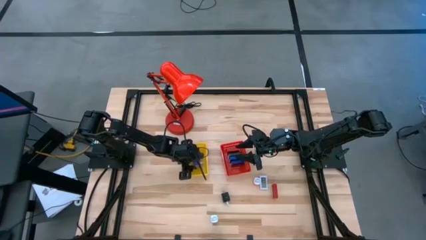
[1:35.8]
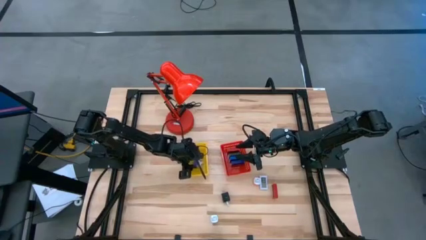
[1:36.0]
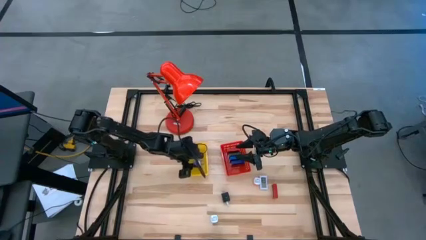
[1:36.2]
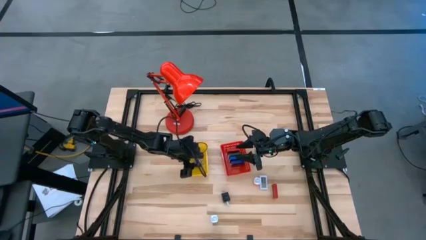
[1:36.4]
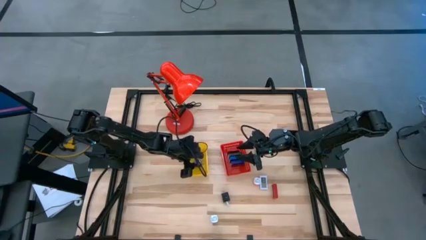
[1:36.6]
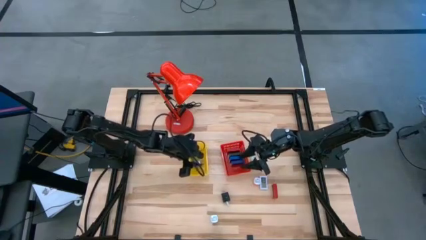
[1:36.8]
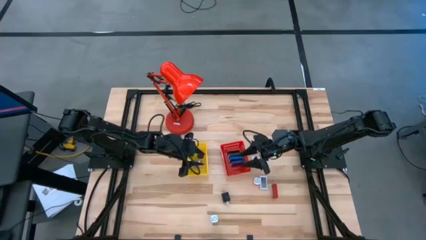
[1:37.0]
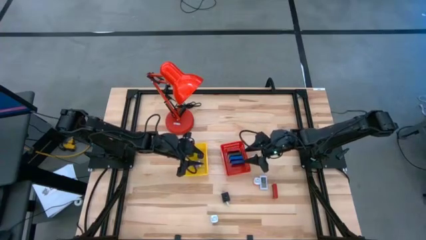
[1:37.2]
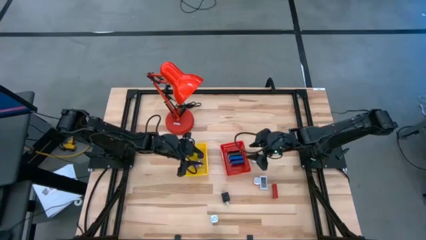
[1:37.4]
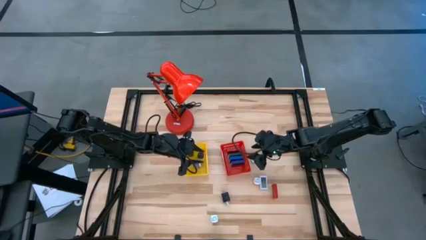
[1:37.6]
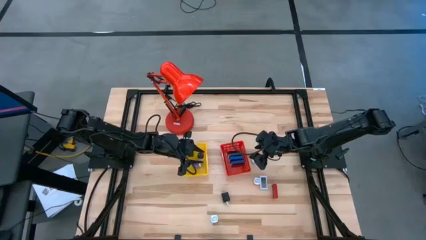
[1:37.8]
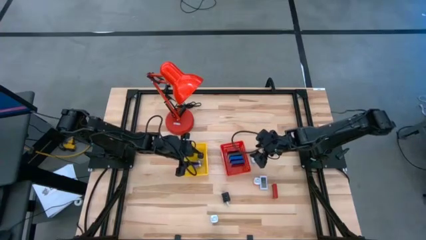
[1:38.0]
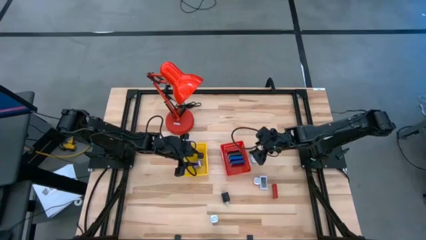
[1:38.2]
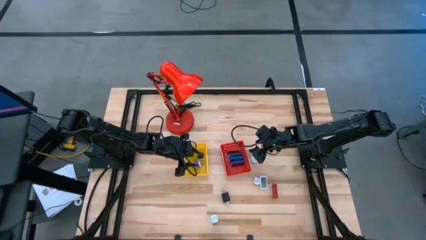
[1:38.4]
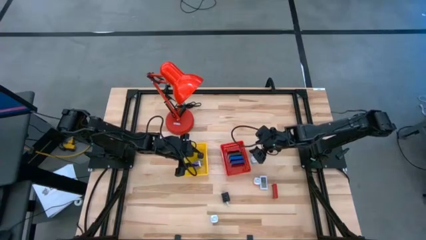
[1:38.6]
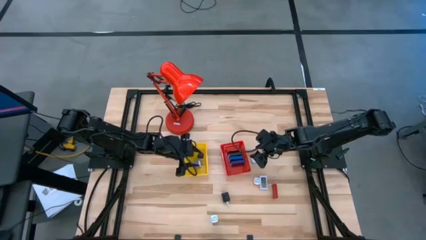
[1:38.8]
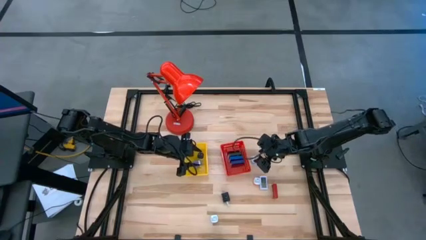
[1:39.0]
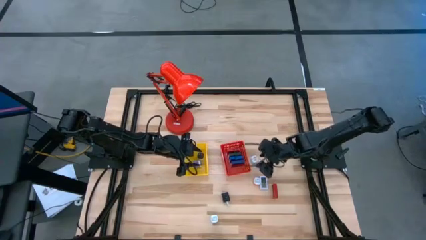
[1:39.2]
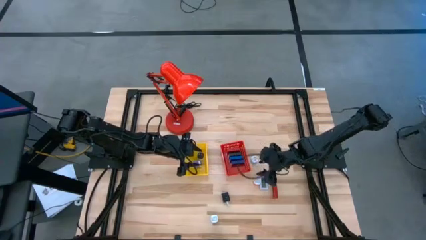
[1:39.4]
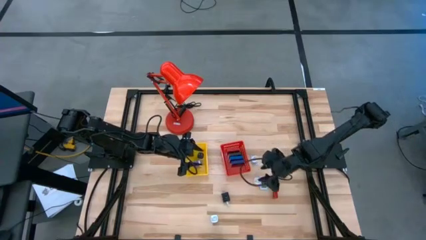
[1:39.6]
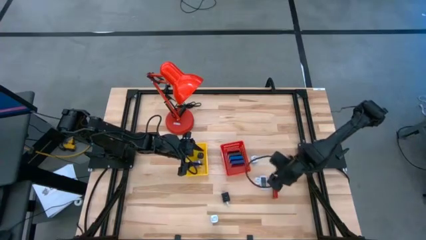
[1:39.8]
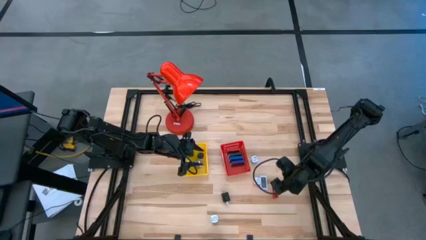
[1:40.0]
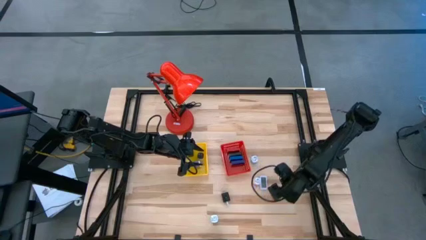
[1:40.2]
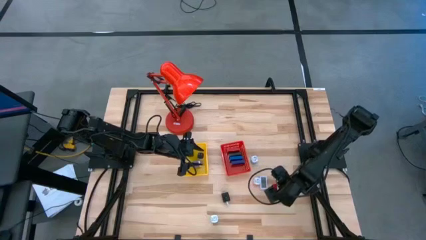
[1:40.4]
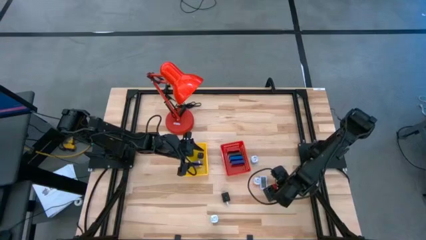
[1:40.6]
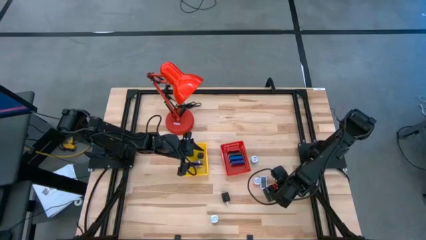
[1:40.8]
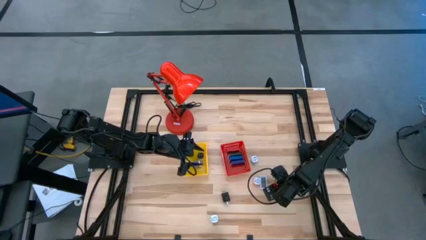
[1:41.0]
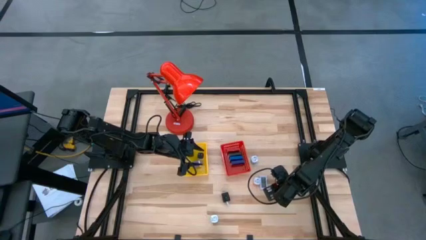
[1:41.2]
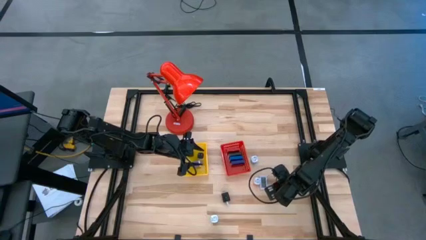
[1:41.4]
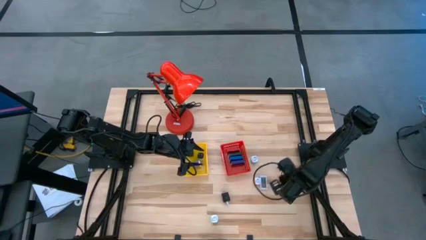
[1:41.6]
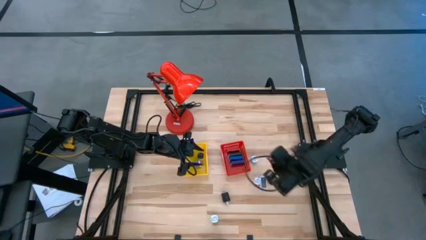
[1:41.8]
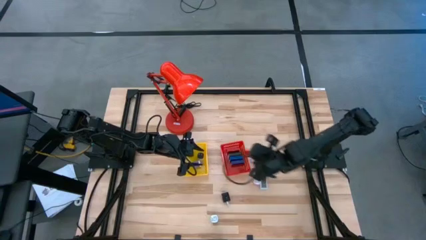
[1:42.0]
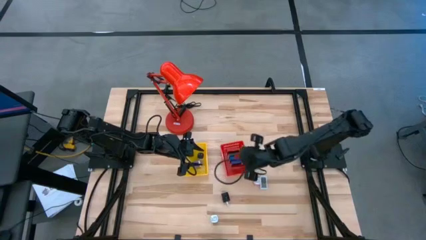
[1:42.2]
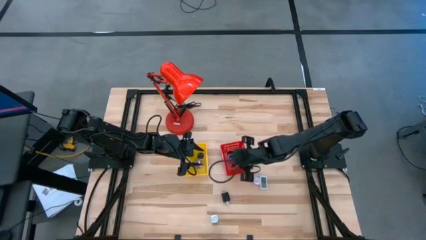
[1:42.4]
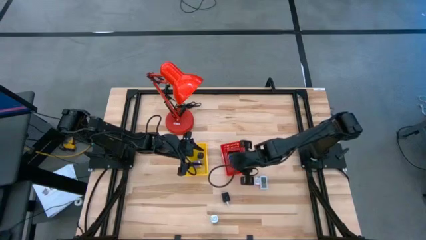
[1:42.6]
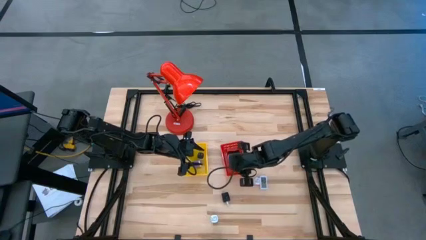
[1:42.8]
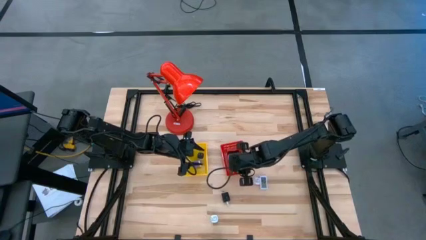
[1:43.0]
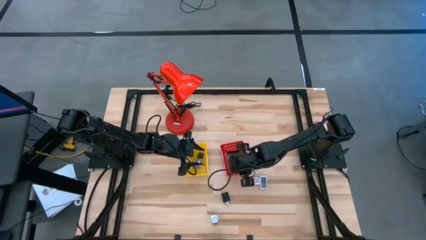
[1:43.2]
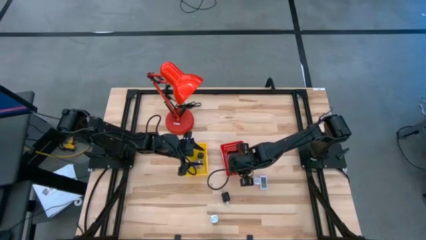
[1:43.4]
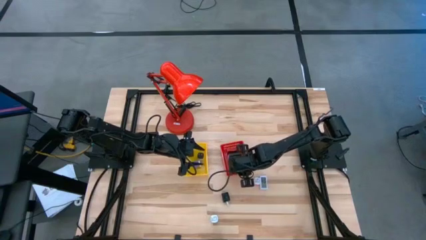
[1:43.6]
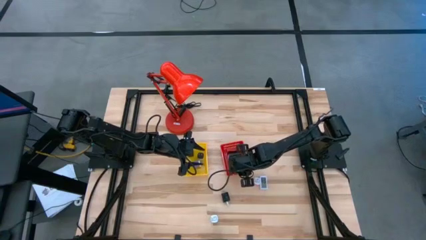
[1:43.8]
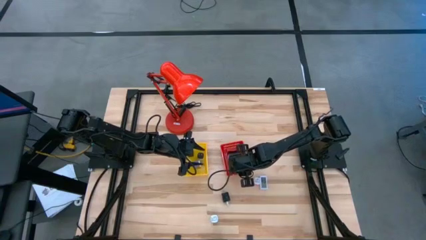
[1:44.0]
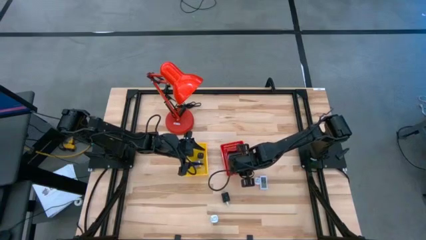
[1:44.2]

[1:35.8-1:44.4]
Task: Pick & Place Office items
Put the red digital timer into the red bin

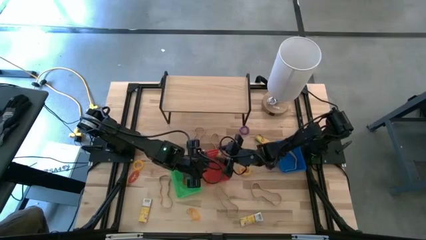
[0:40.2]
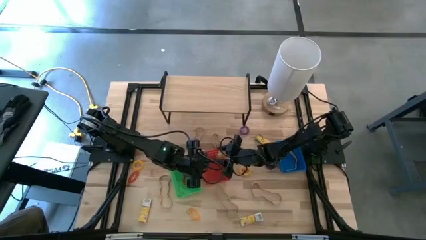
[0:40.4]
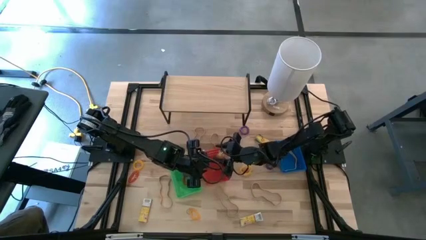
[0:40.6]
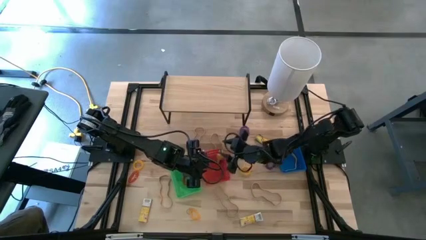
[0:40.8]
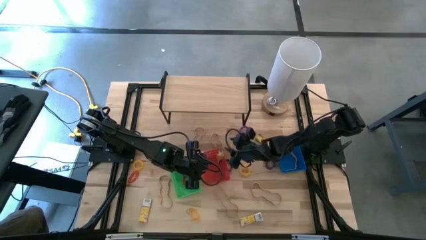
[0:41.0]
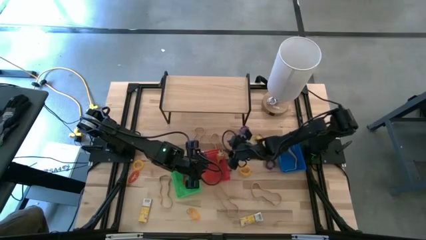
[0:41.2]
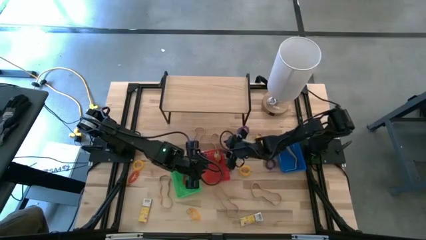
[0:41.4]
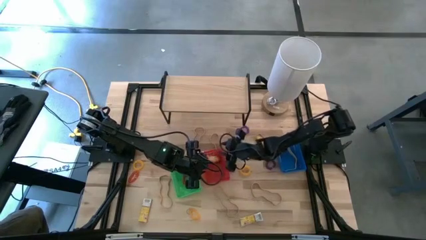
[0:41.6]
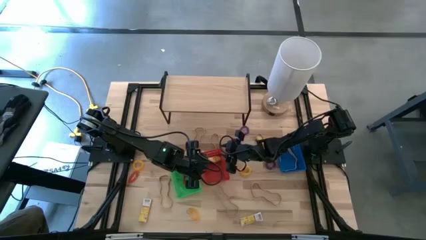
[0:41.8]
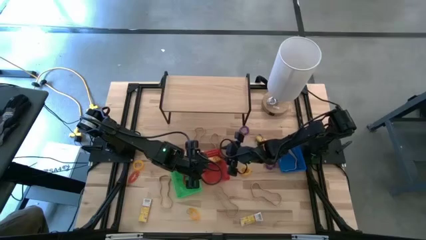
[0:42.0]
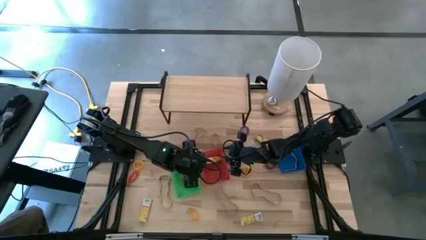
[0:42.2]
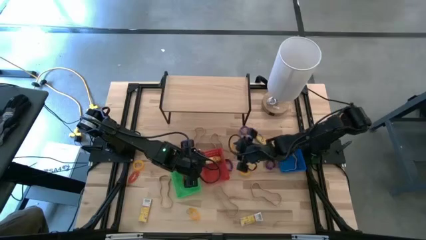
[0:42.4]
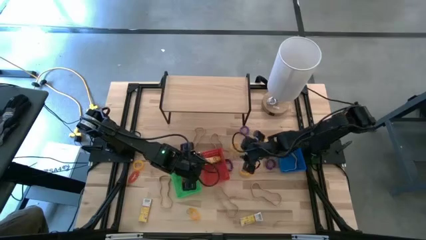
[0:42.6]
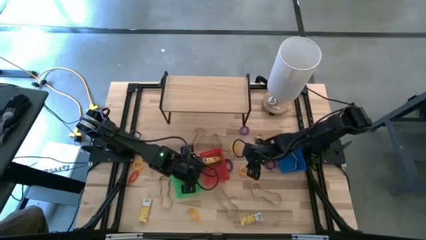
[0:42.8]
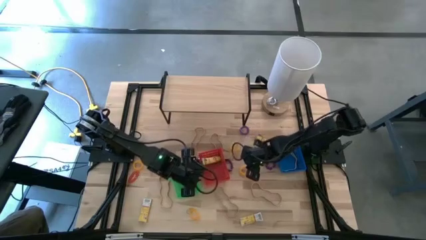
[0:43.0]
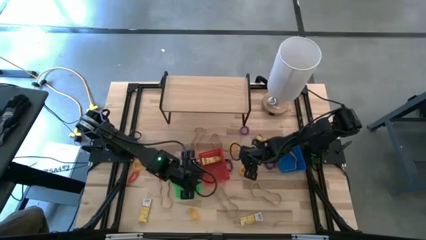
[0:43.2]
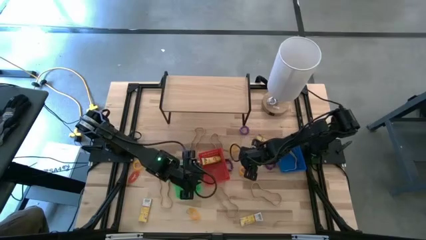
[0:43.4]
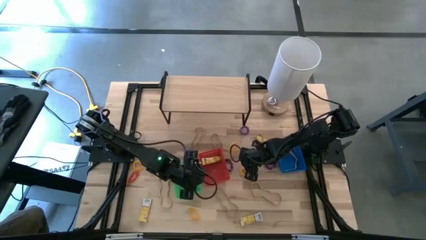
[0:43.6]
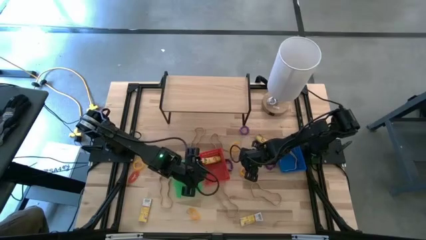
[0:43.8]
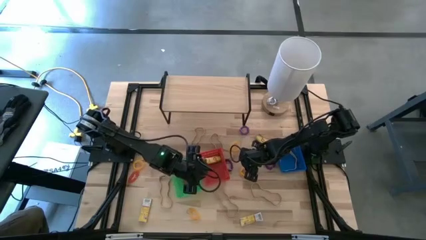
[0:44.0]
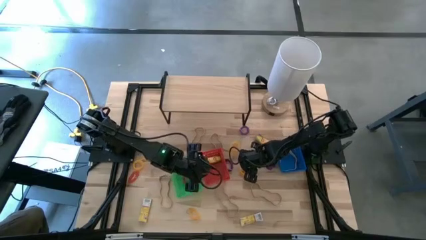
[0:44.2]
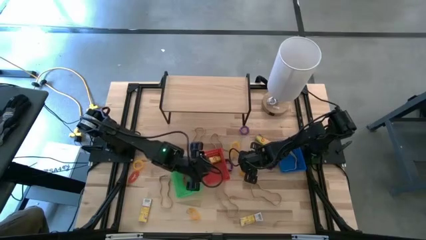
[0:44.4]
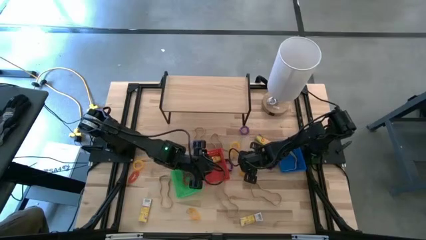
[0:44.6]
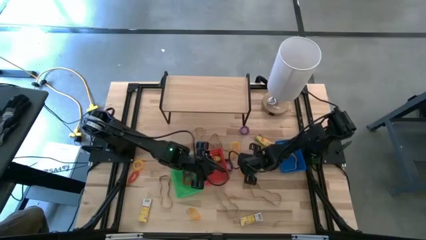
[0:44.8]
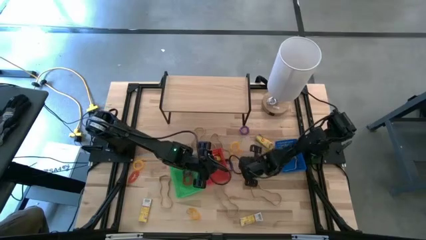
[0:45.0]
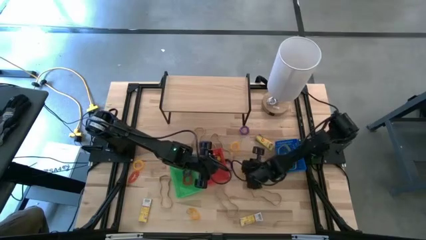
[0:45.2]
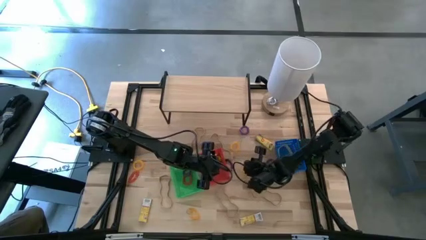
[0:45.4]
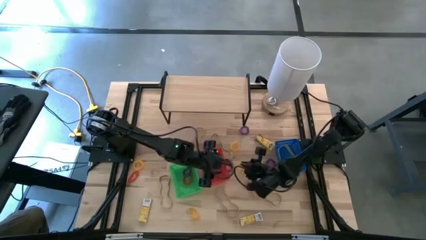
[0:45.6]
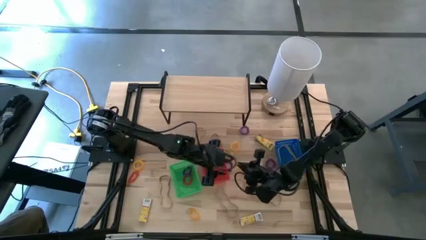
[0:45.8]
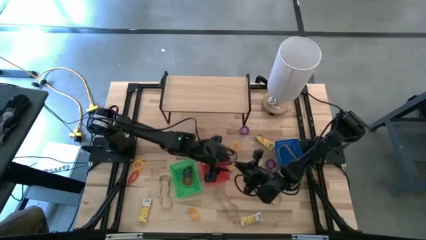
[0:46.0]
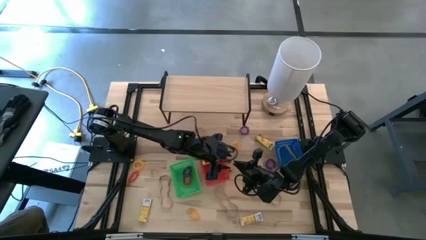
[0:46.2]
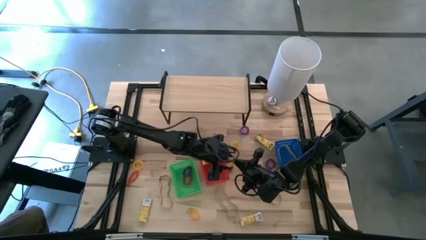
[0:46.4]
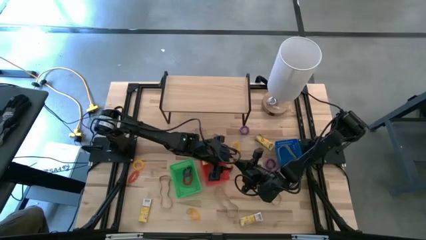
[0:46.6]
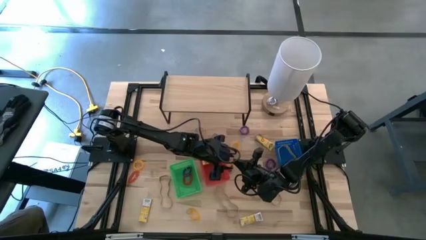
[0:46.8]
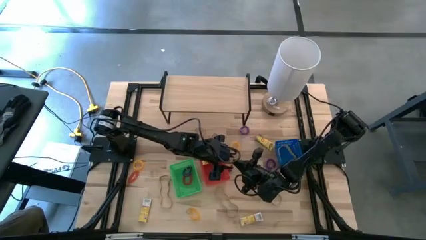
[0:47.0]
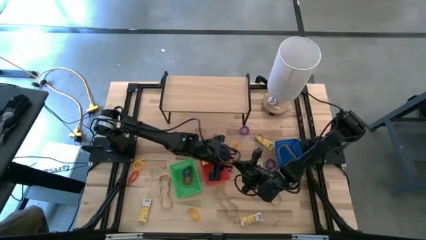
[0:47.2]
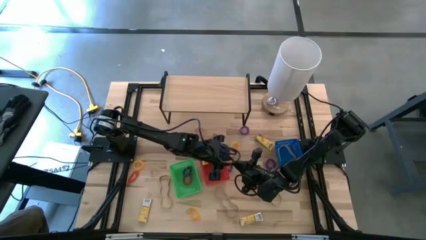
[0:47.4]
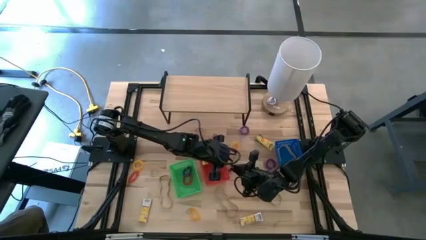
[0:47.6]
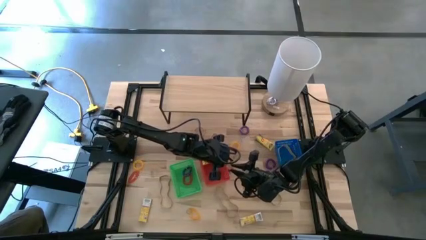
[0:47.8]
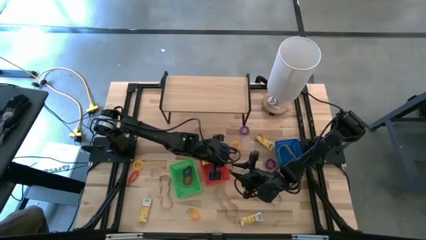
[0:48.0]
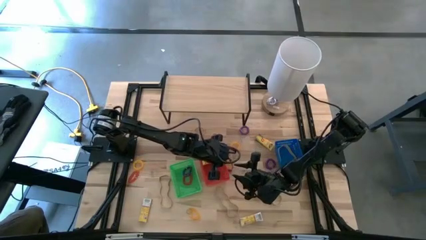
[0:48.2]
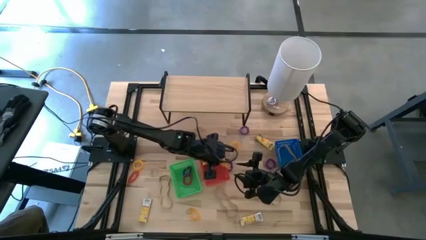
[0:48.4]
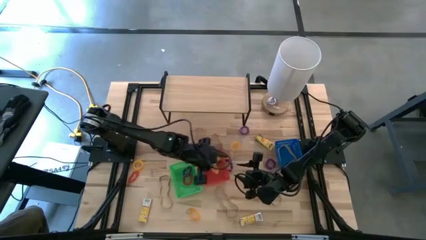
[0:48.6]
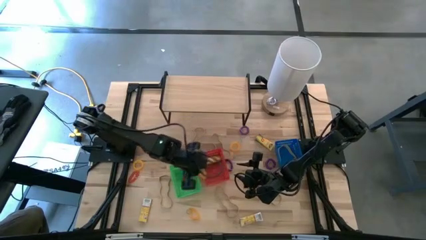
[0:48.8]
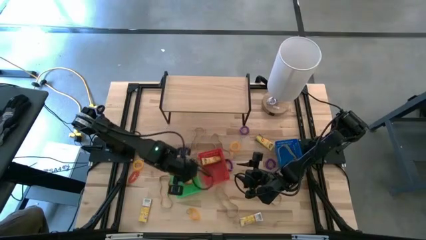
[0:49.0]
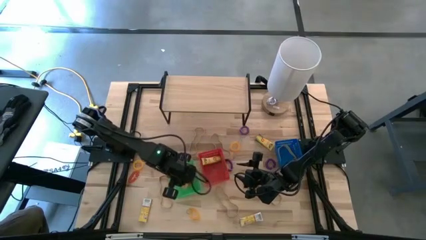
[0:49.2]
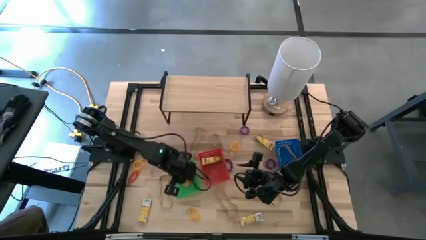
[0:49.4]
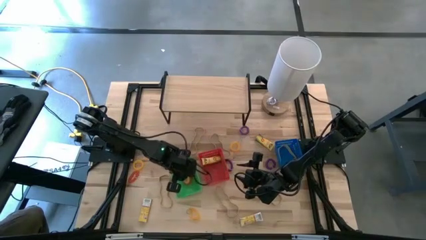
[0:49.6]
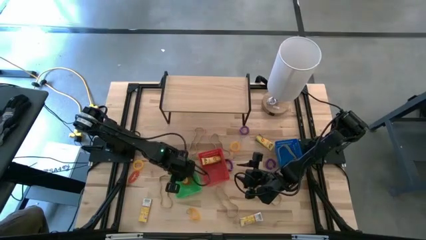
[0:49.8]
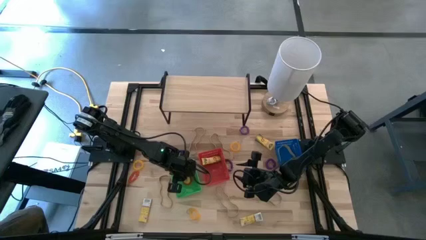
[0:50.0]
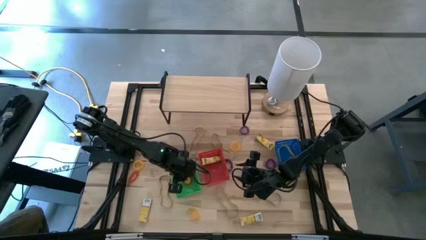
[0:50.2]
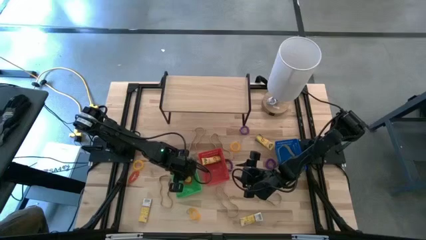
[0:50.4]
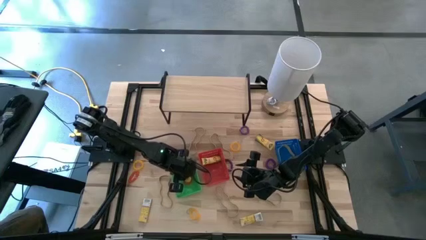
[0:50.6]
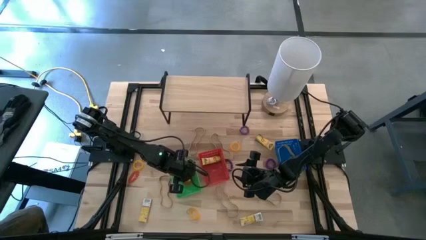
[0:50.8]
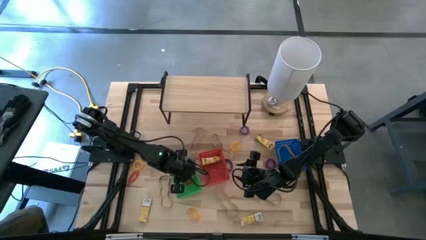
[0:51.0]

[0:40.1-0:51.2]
Task: Pick & Place Office Desk Supplies
Put the yellow spring keychain into the green bin
